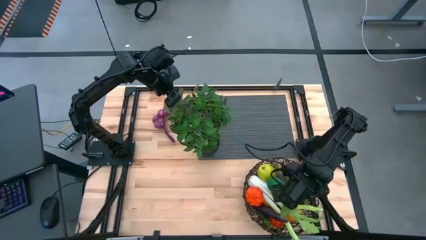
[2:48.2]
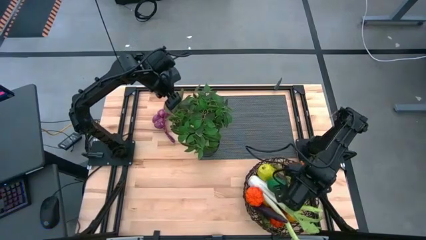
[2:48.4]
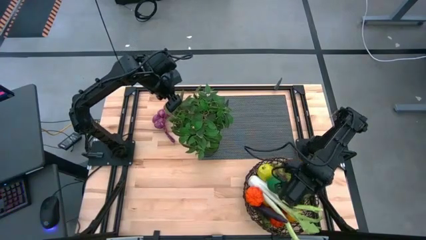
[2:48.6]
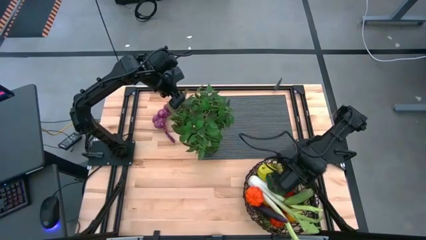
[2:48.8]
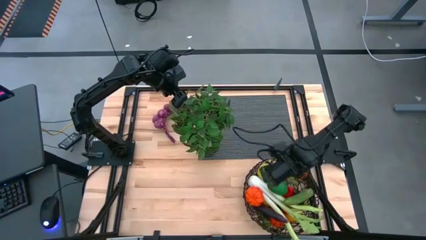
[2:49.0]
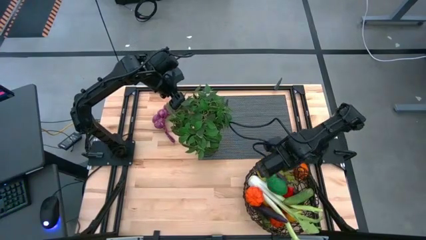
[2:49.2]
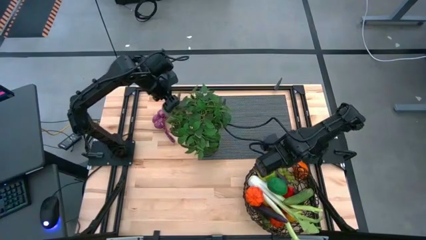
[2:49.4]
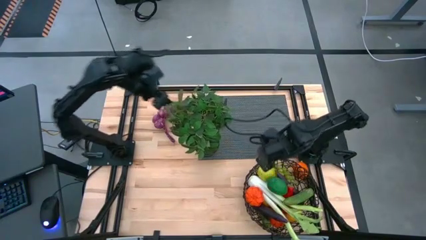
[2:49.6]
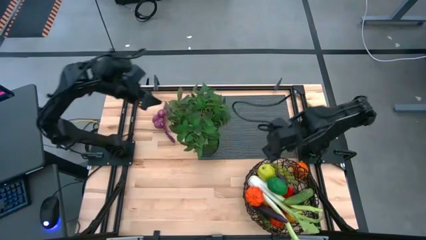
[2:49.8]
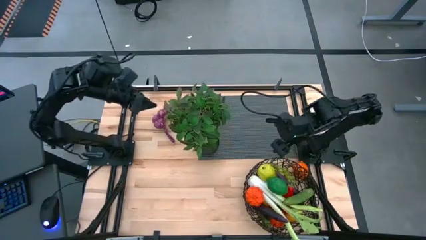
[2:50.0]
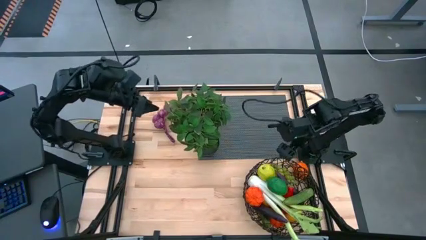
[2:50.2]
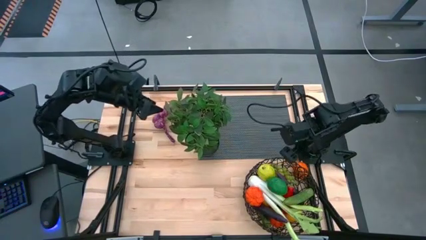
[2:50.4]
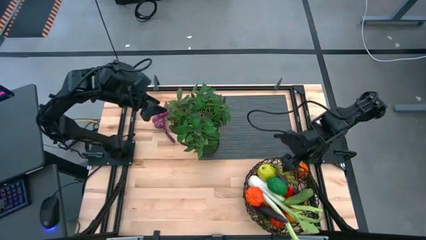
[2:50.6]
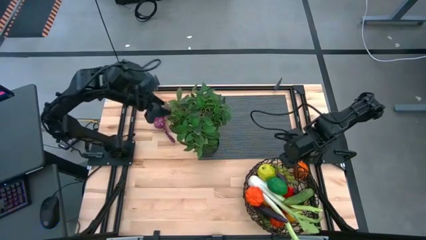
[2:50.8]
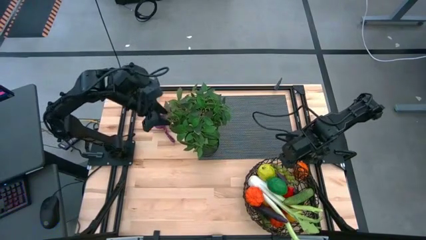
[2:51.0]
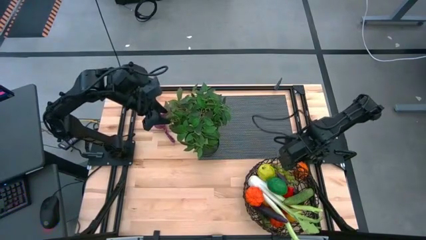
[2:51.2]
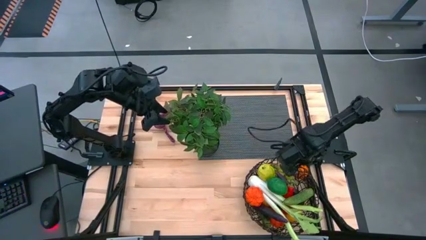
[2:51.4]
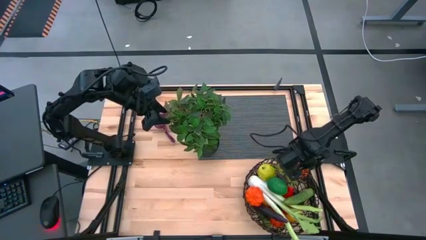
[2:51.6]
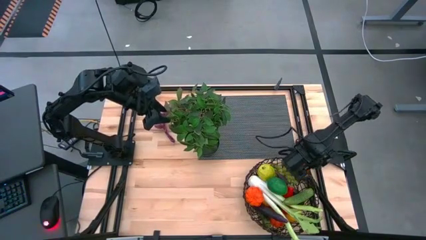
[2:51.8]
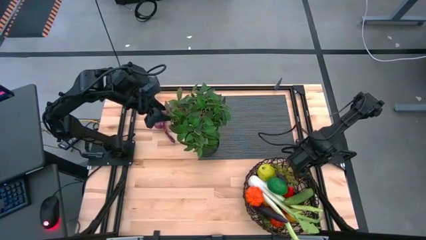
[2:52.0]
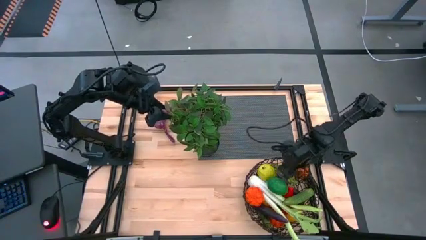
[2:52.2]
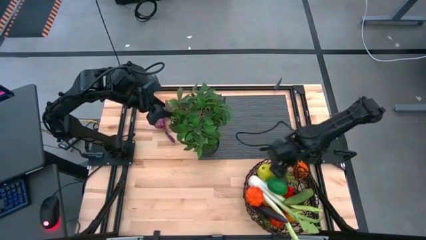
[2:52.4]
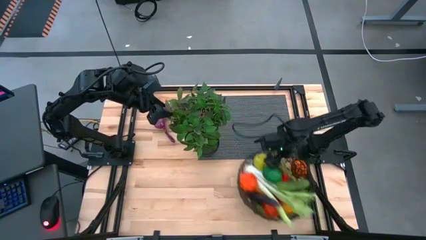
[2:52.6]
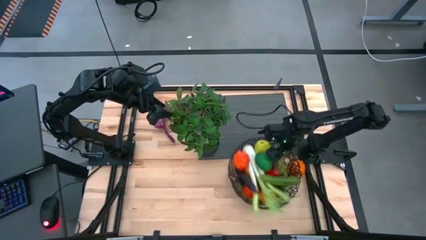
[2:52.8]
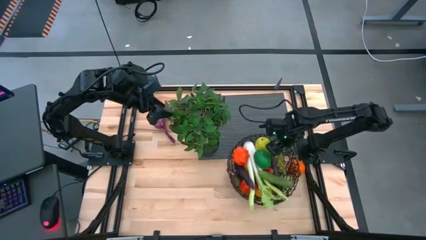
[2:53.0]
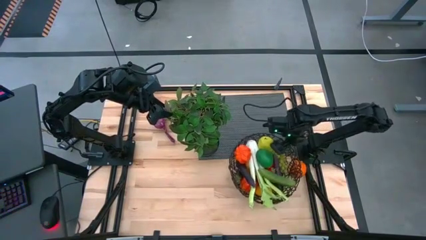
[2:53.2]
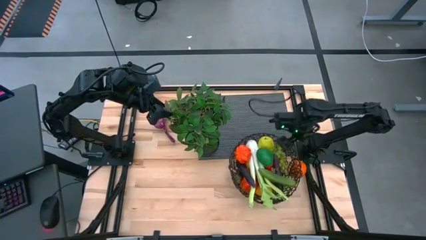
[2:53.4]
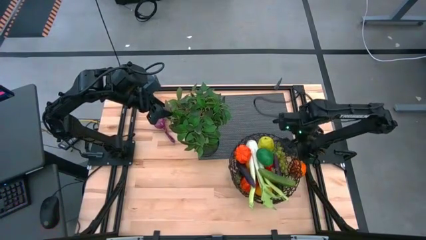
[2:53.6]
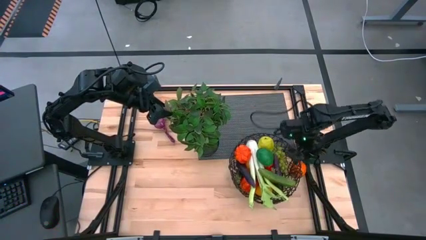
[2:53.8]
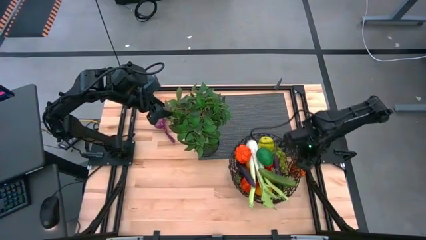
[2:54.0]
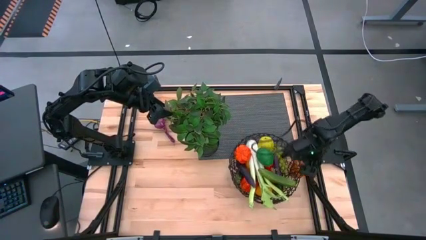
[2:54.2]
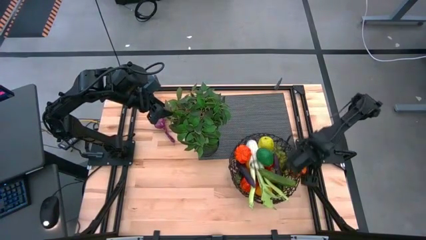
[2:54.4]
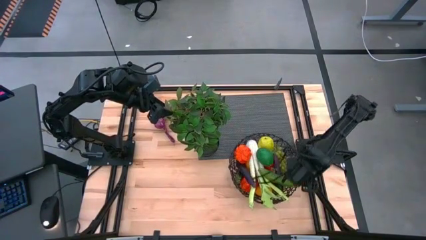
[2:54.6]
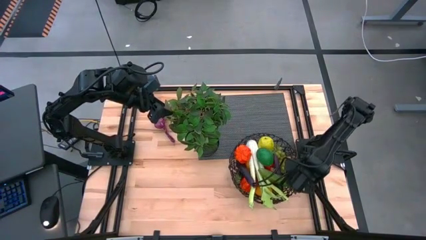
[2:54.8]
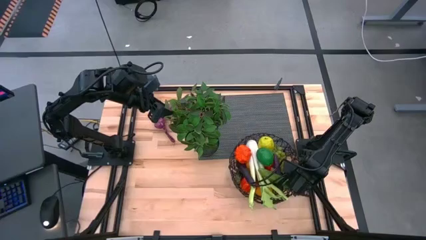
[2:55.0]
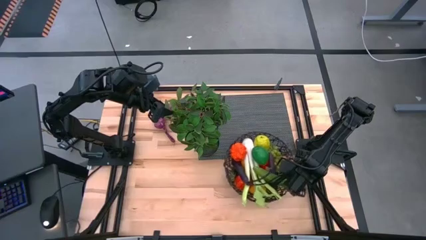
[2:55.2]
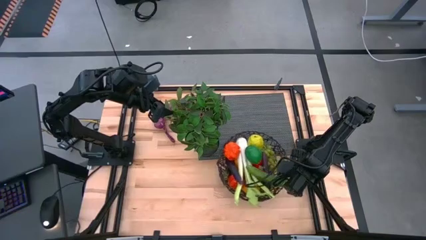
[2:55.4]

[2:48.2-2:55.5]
Task: Build produce basket
Adjust the brown wire basket to the center of the table

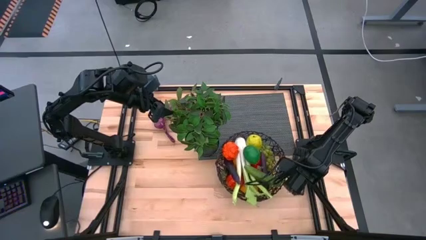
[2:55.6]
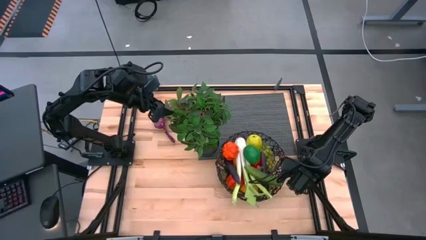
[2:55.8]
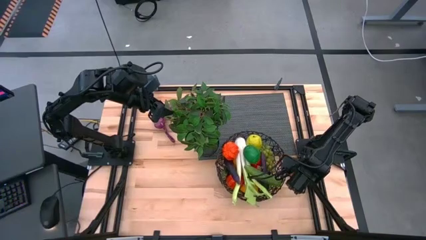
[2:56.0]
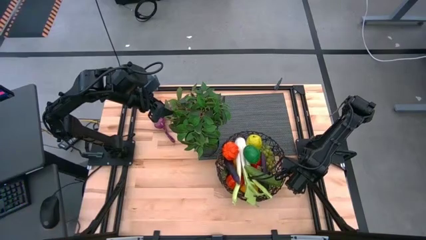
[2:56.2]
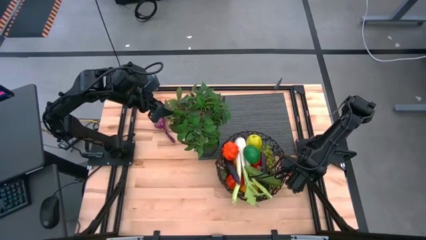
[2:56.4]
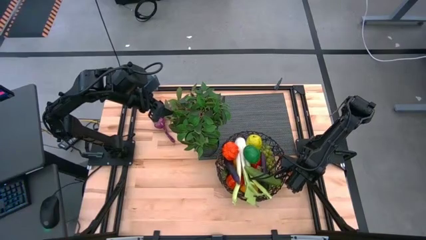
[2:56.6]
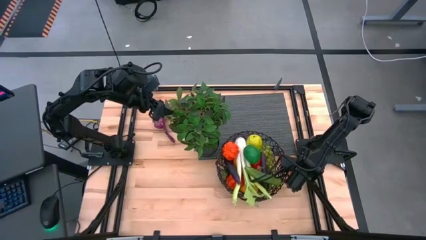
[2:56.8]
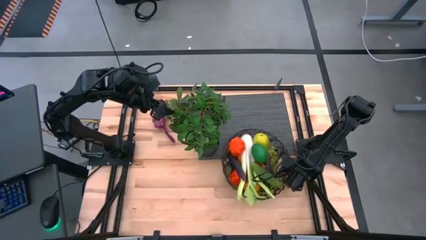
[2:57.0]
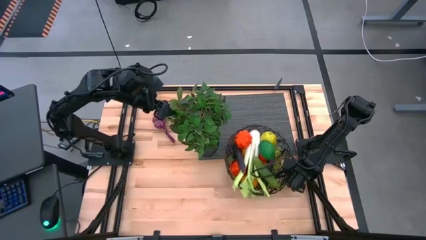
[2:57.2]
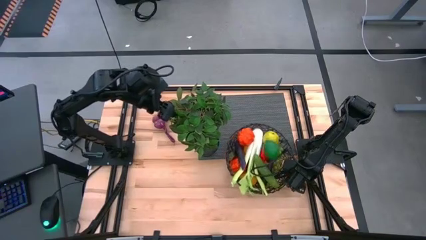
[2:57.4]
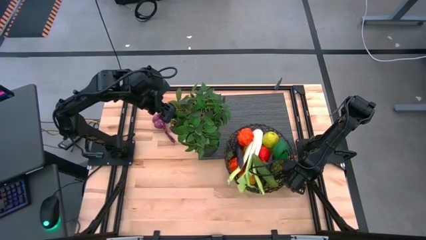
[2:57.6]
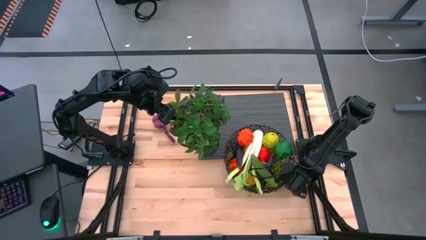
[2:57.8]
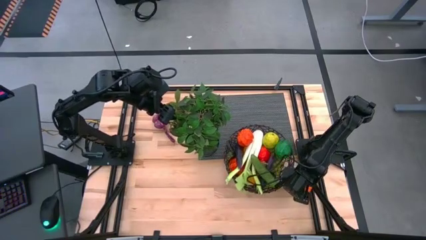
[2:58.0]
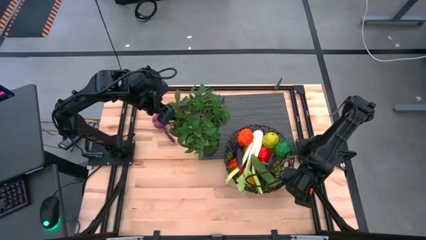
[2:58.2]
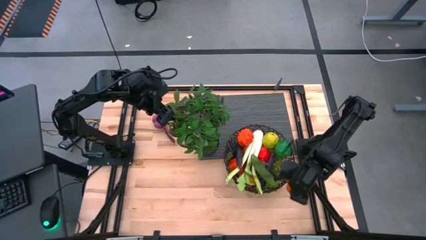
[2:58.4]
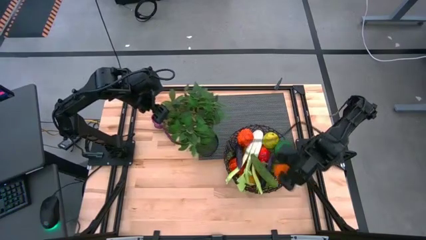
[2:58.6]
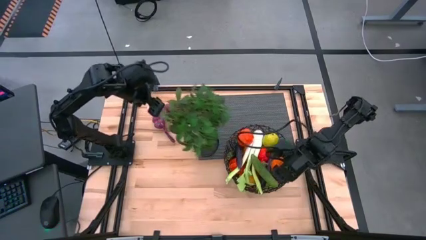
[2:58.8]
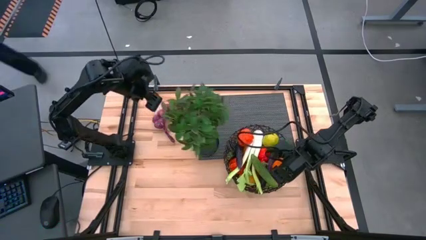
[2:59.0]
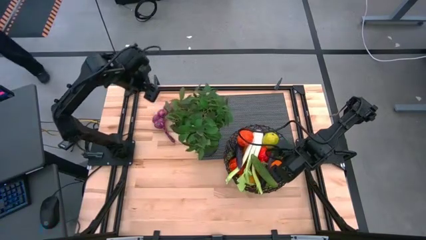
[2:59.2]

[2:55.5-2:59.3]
Put the orange into the brown wire basket

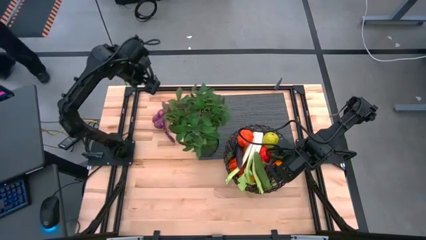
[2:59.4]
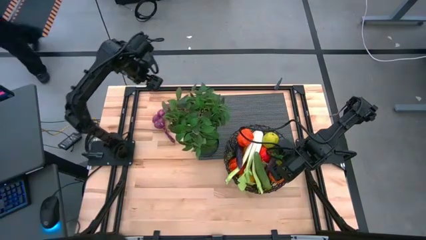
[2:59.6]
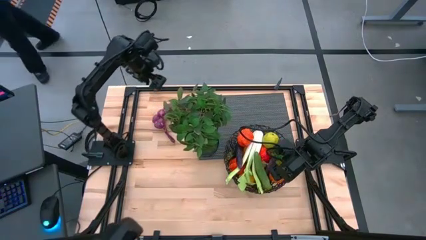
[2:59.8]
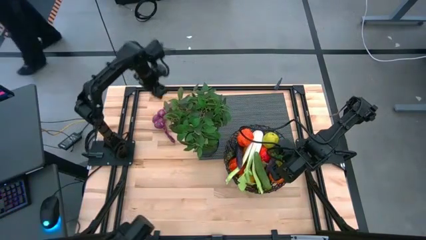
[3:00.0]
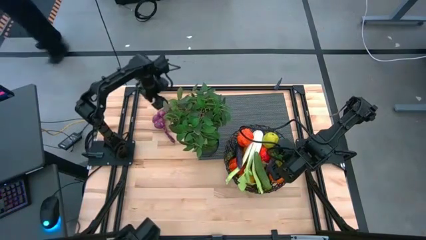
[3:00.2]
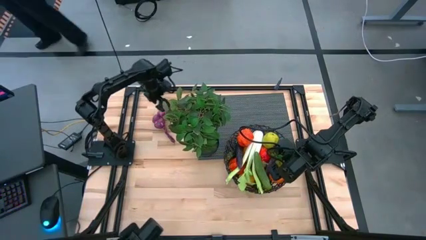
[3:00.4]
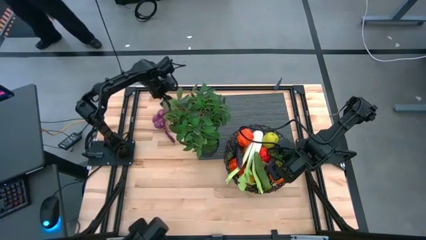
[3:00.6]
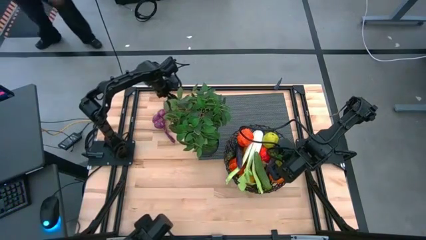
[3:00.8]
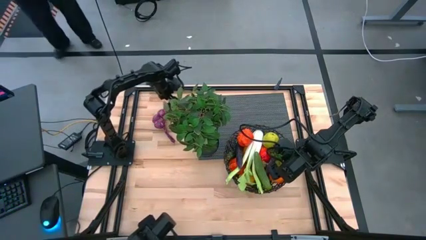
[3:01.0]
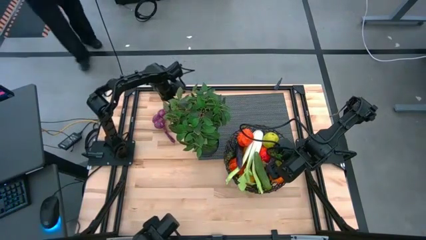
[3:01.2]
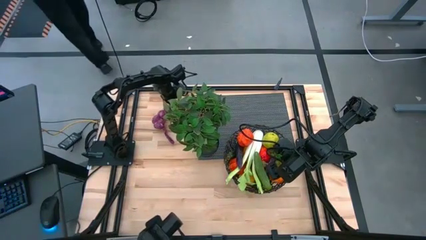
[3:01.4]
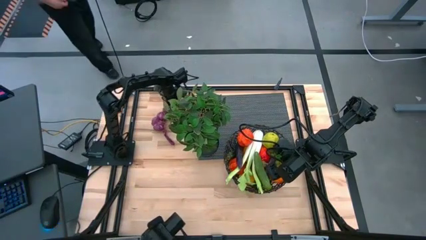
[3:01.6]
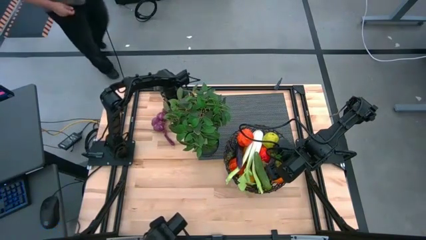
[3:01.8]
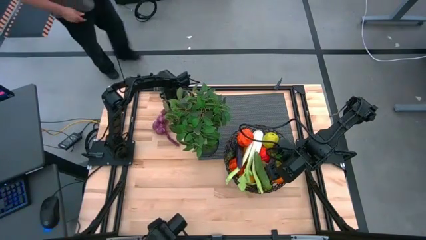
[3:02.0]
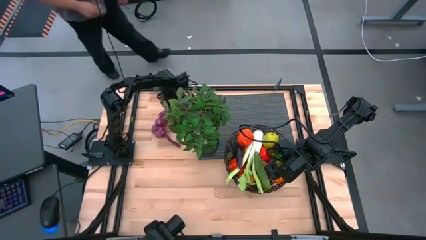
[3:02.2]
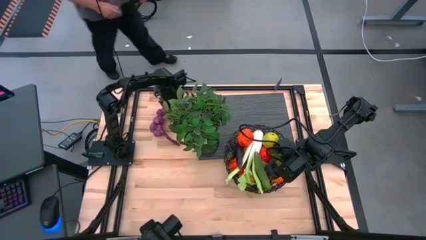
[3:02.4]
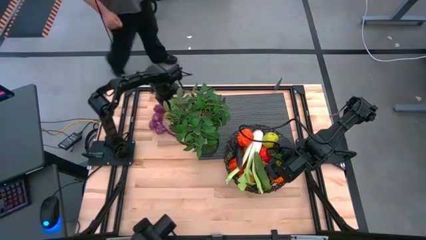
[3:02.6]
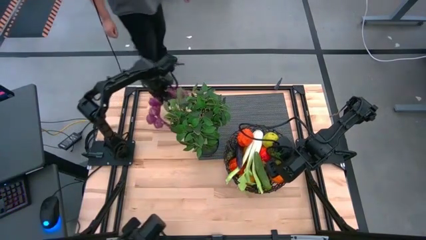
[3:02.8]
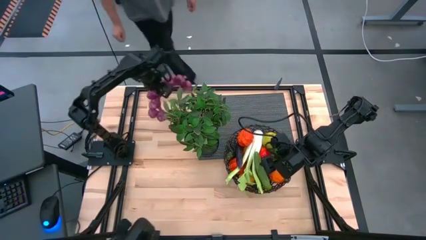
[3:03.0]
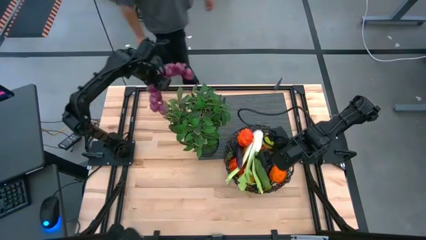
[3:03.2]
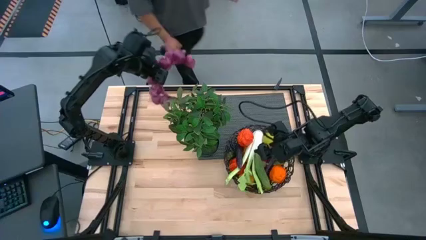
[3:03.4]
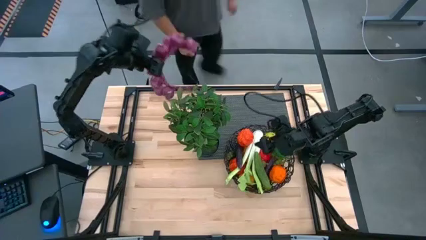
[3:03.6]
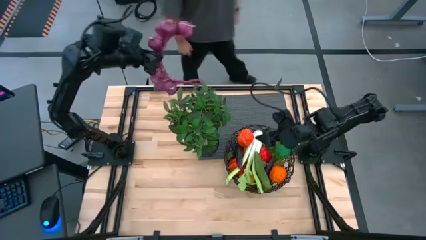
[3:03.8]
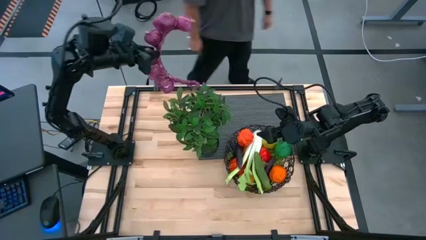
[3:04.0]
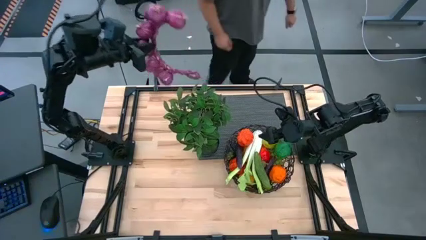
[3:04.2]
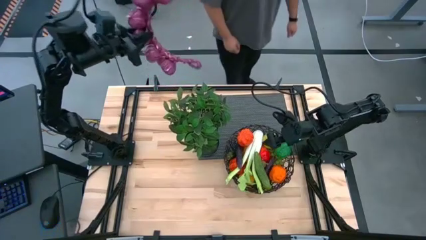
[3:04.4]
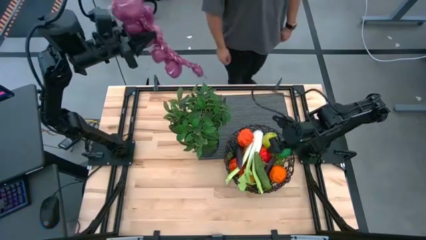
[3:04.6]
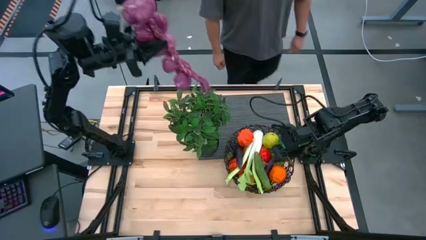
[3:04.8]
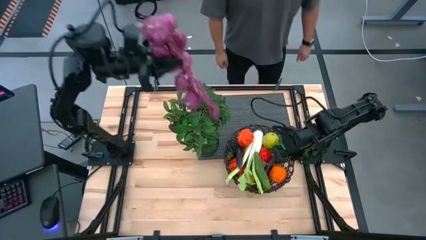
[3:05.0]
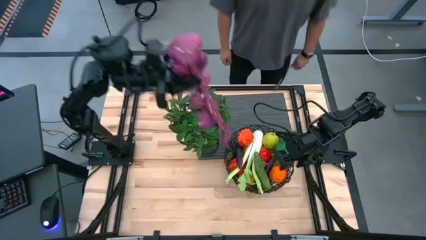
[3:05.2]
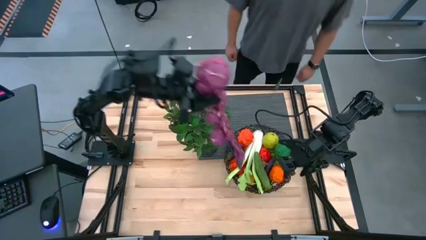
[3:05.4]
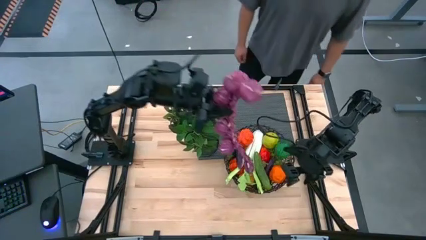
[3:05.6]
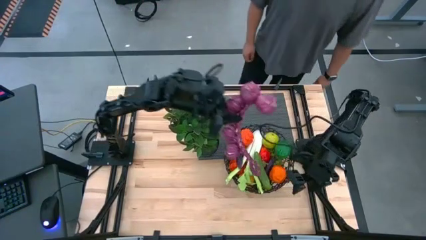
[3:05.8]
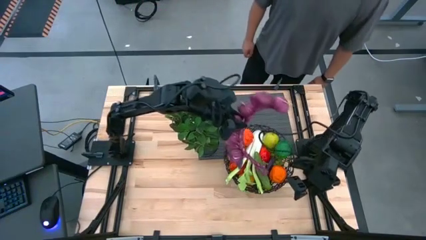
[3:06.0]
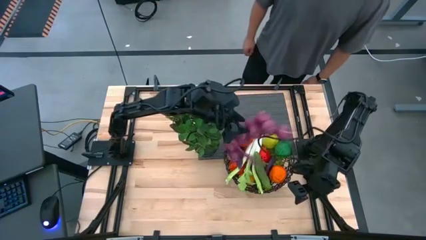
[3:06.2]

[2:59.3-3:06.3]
Put the purple garlic into the brown wire basket
